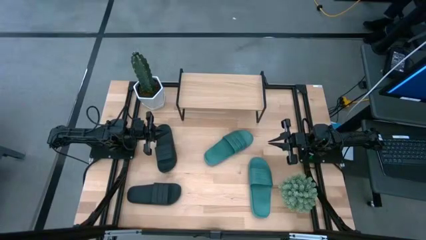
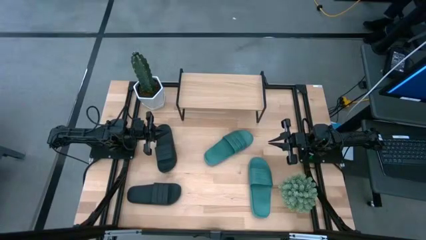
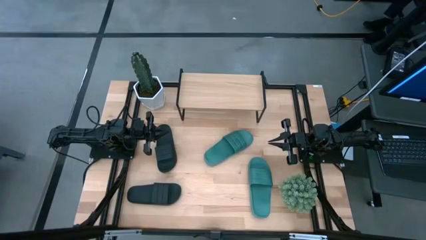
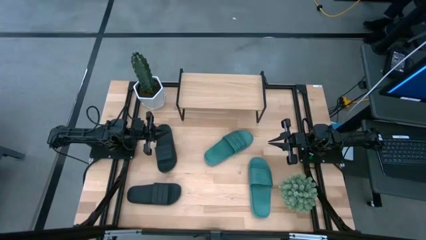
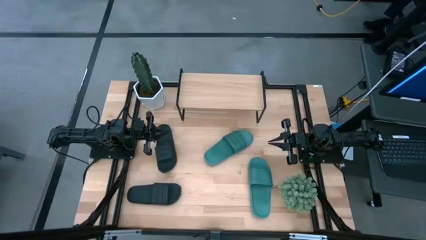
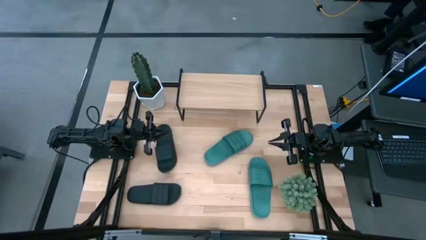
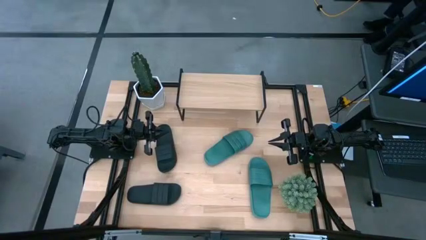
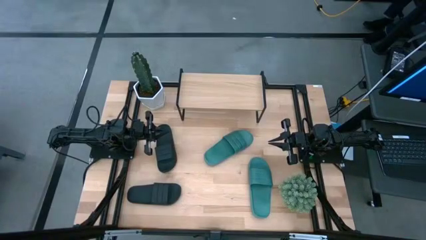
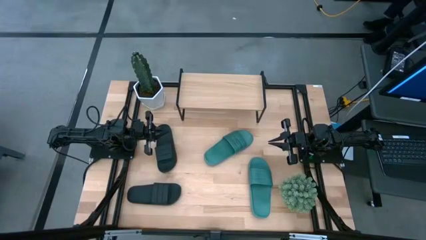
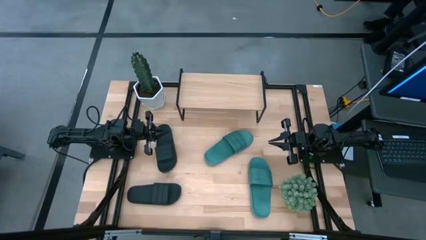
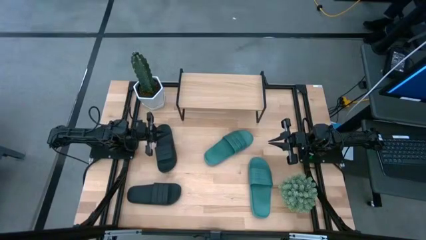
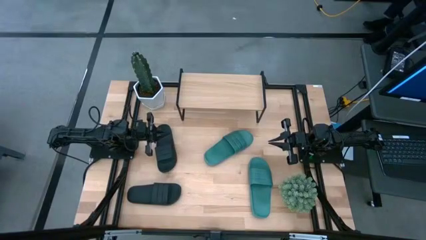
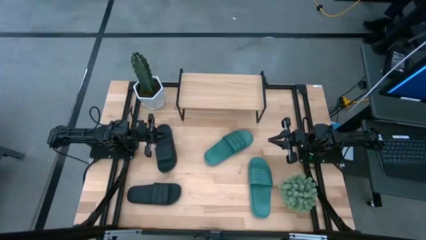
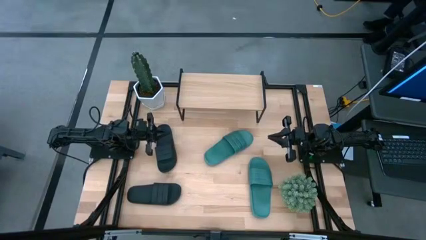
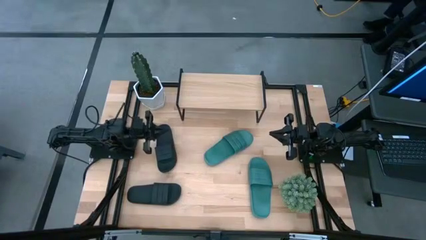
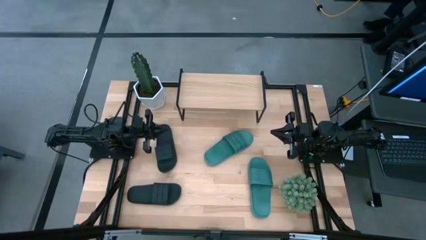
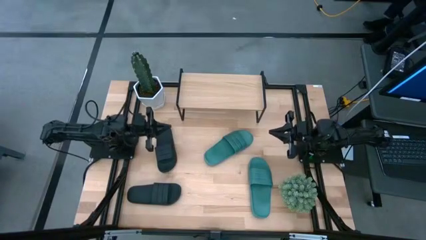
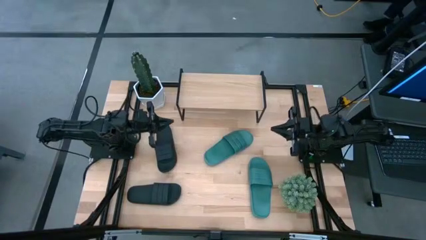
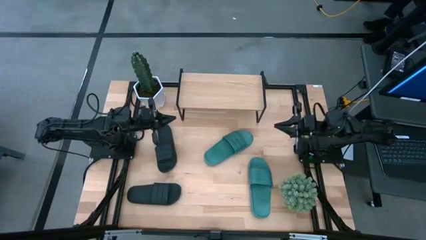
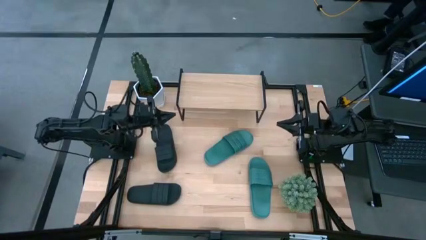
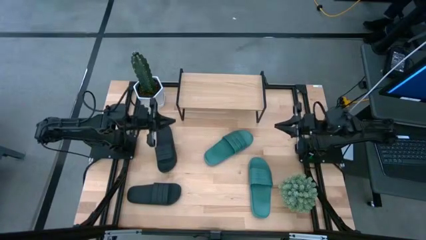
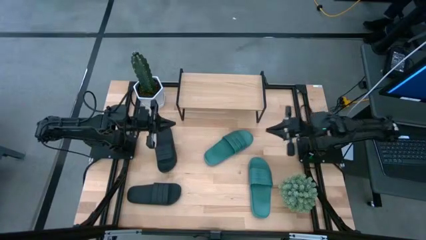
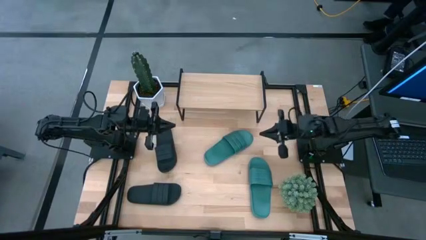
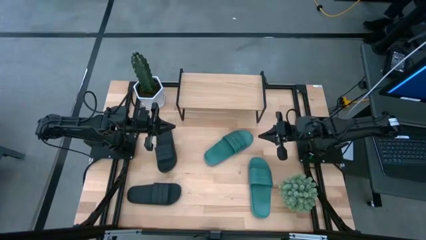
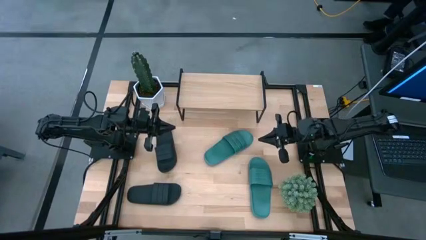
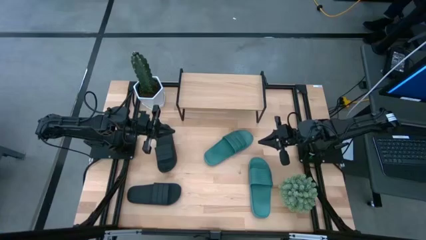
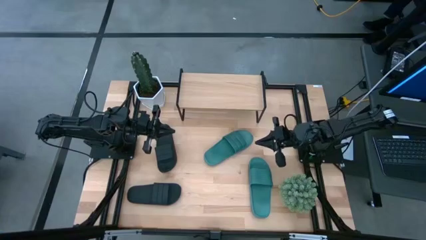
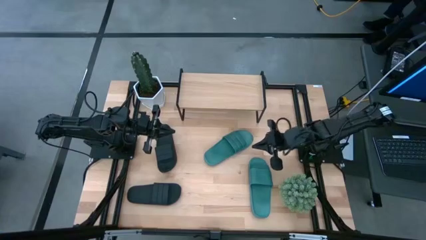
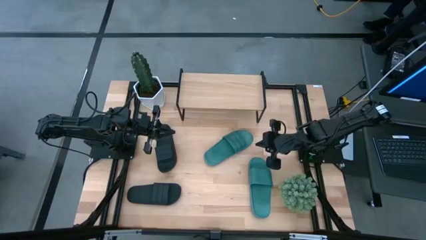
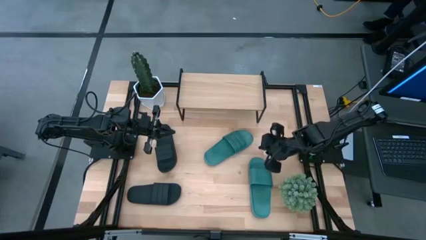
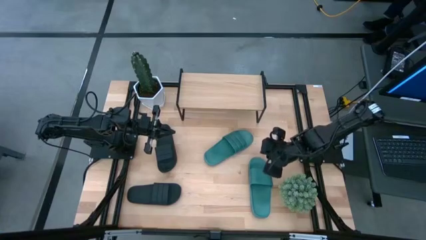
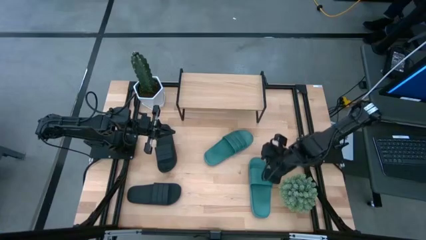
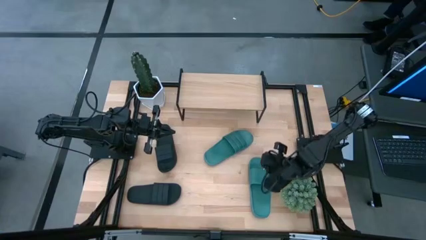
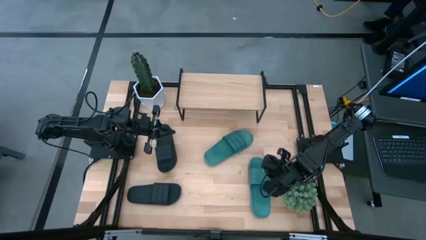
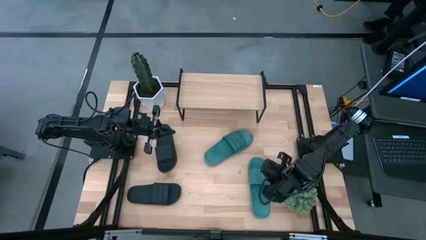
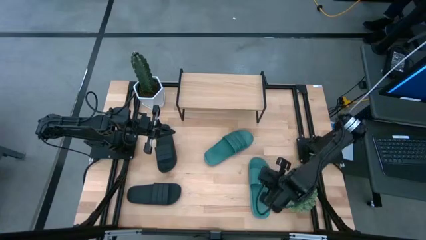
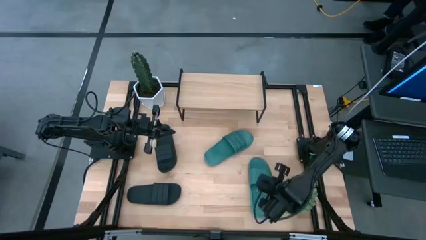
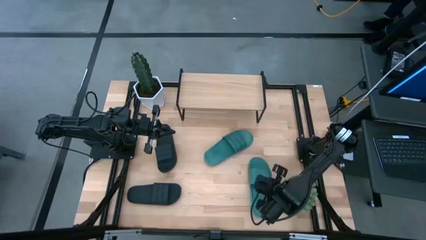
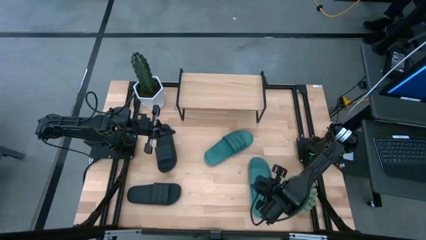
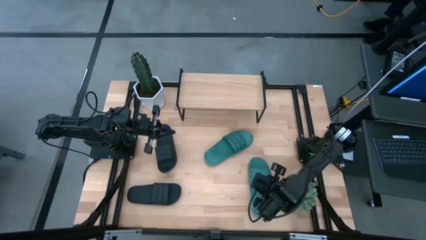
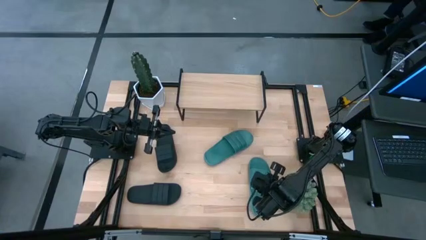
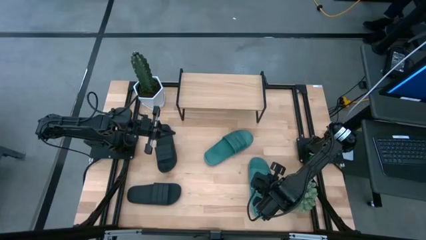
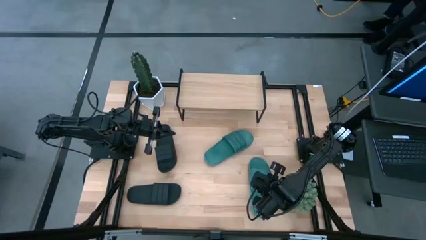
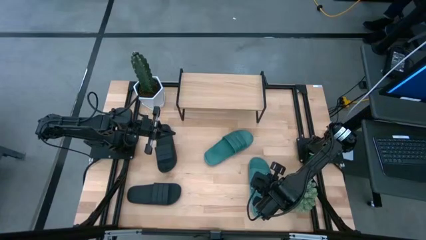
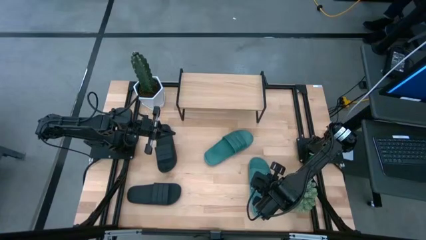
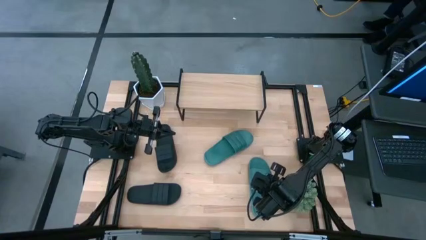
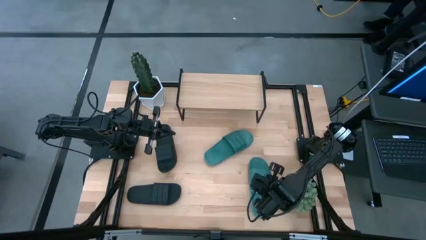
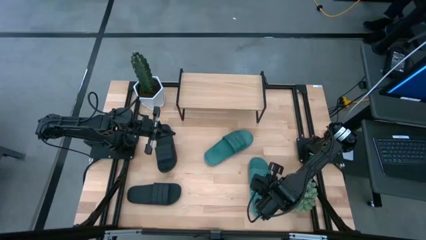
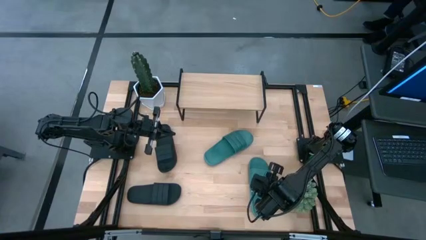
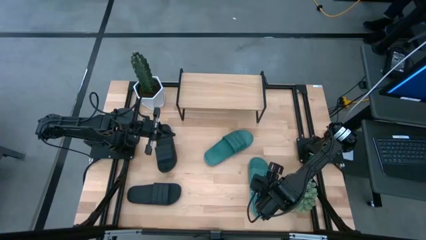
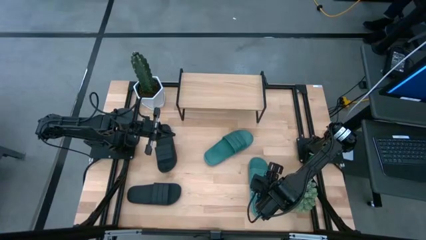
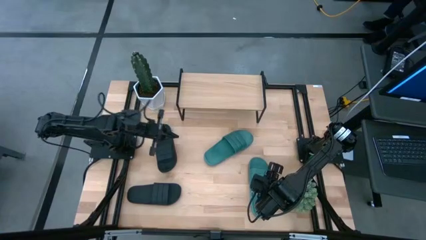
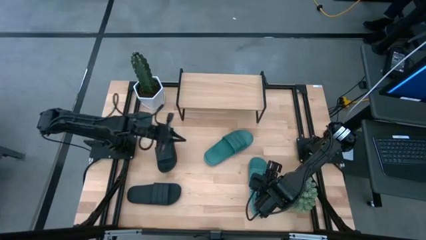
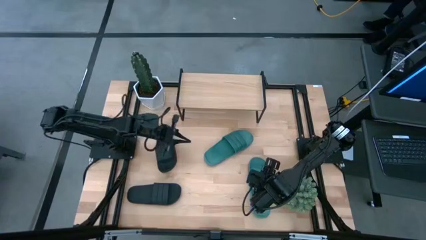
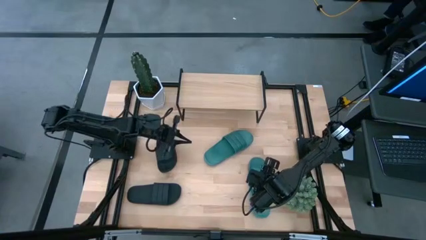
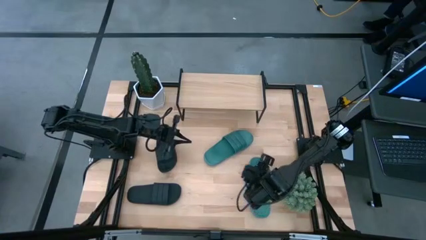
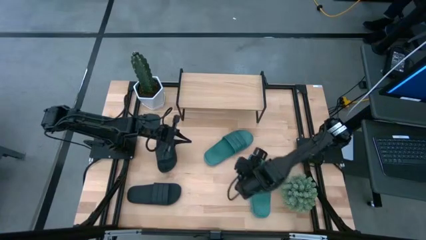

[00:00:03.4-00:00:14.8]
Task: Pick and place slides into the shelf
Put the green slipper on the shelf
